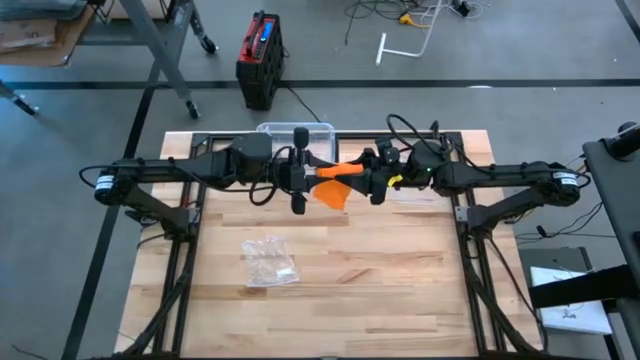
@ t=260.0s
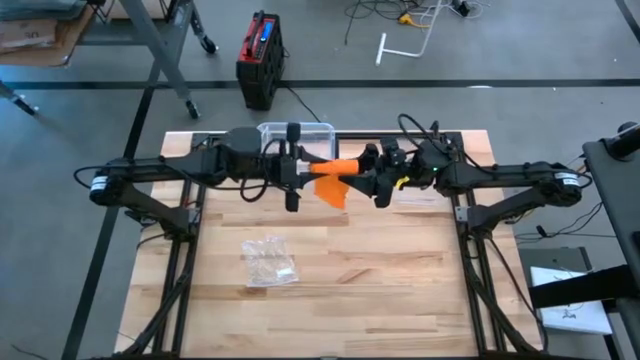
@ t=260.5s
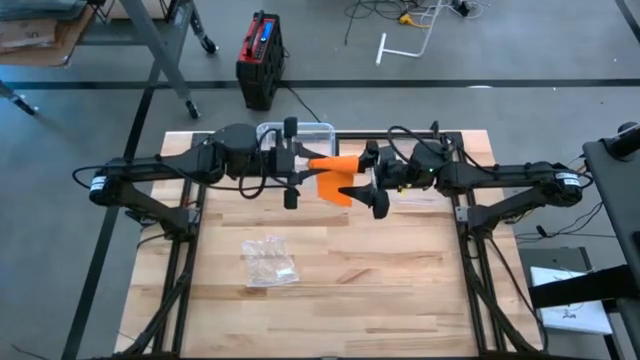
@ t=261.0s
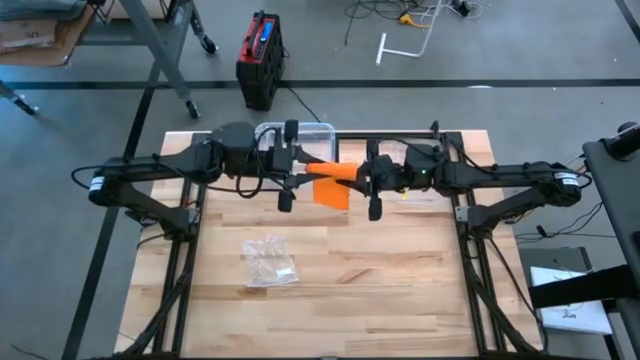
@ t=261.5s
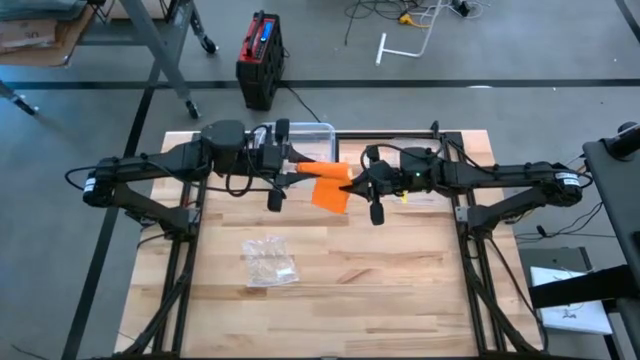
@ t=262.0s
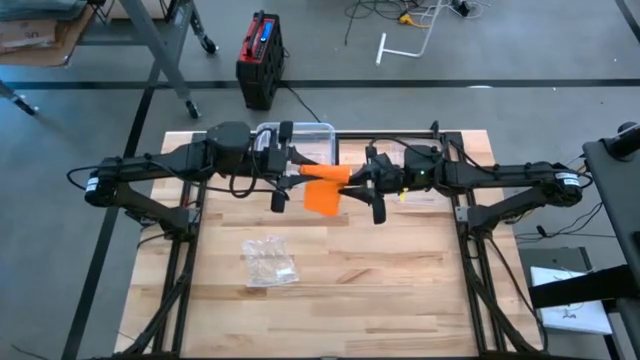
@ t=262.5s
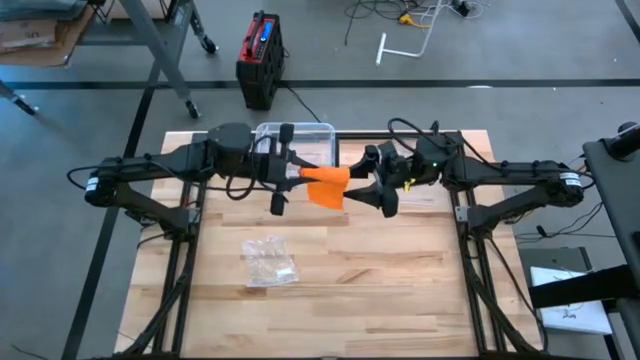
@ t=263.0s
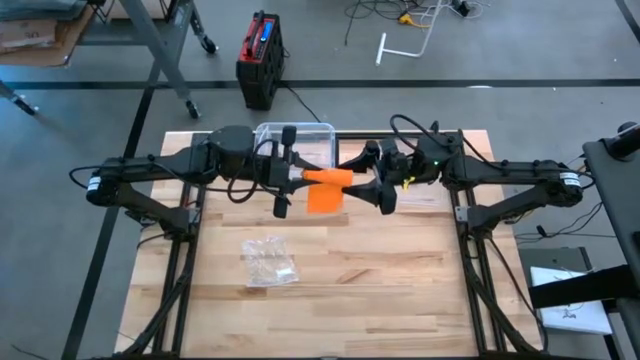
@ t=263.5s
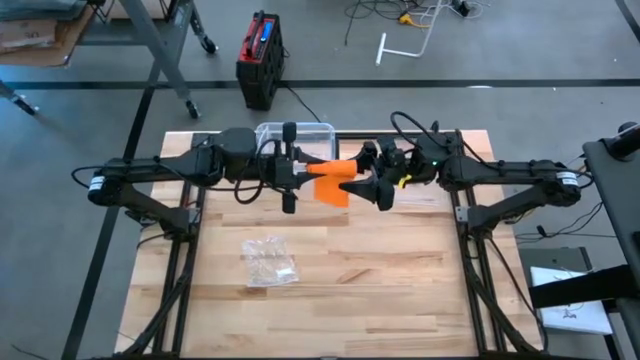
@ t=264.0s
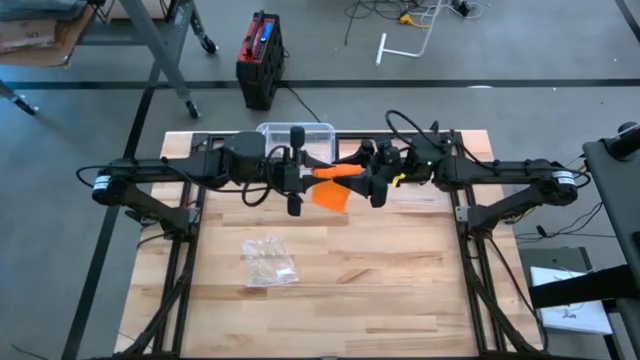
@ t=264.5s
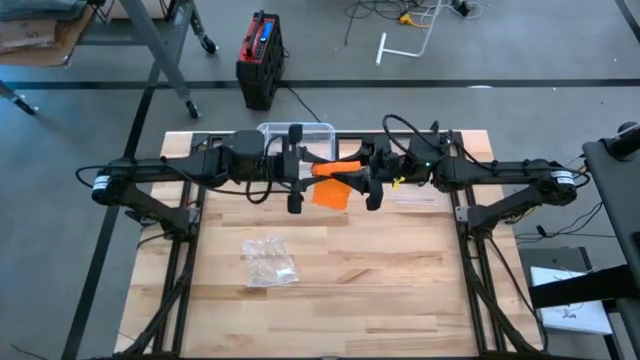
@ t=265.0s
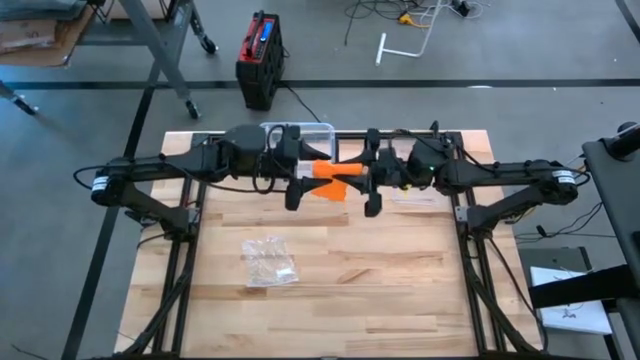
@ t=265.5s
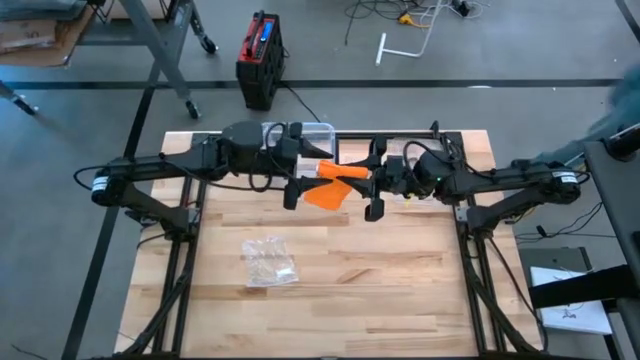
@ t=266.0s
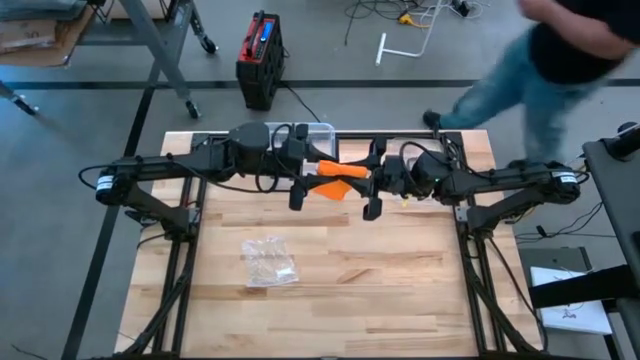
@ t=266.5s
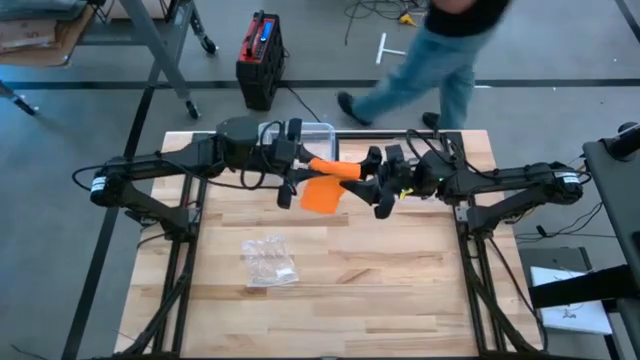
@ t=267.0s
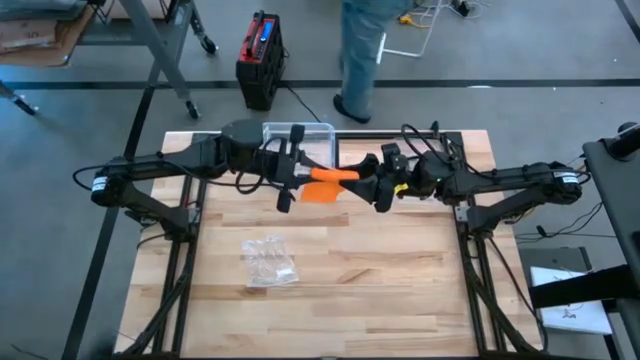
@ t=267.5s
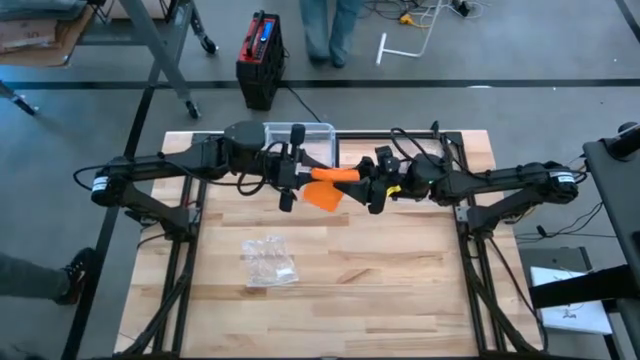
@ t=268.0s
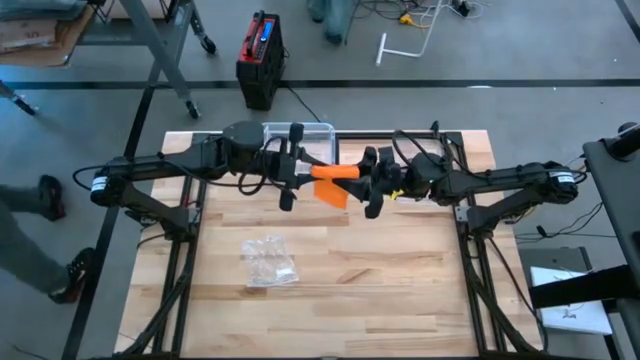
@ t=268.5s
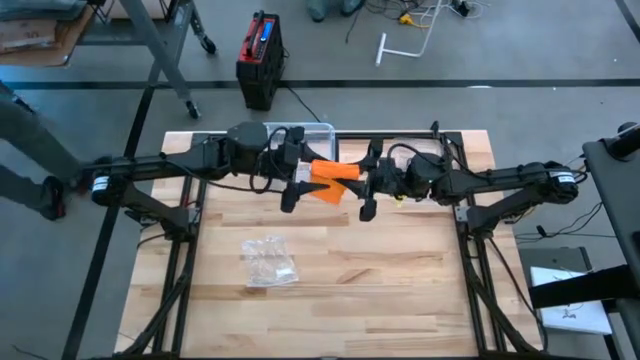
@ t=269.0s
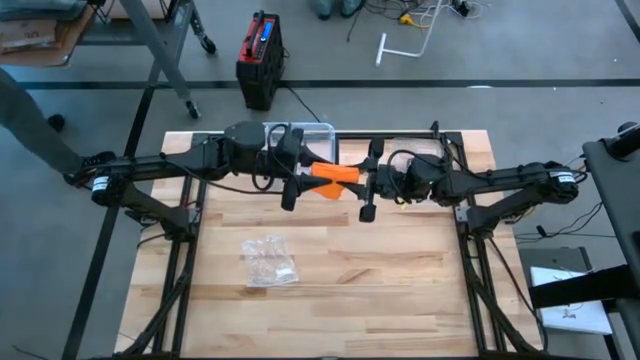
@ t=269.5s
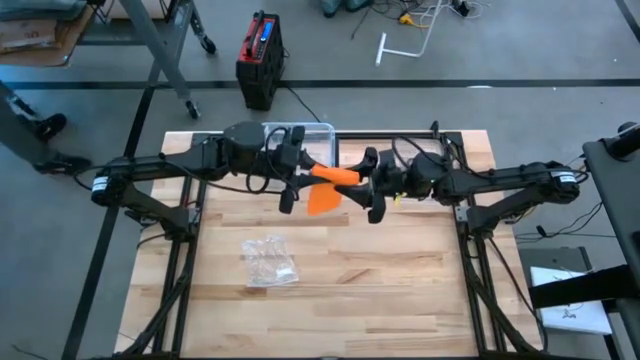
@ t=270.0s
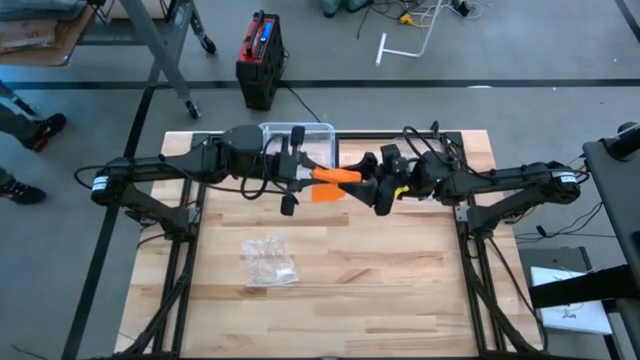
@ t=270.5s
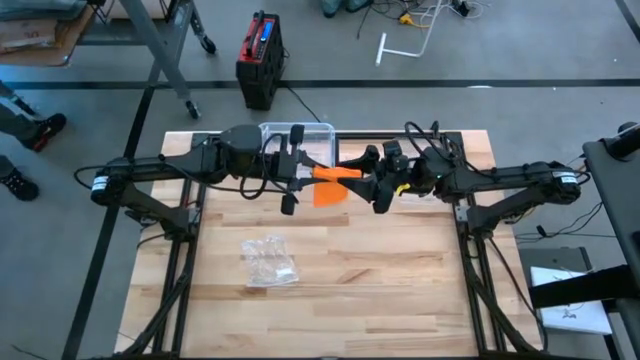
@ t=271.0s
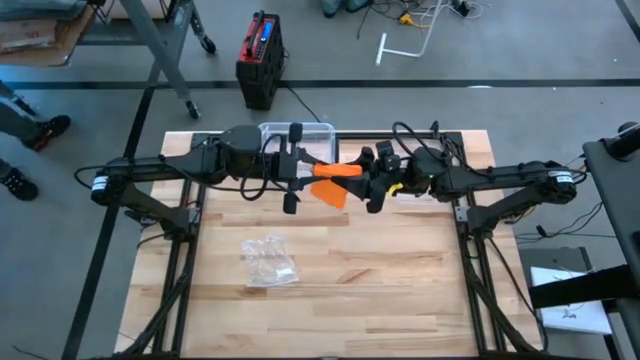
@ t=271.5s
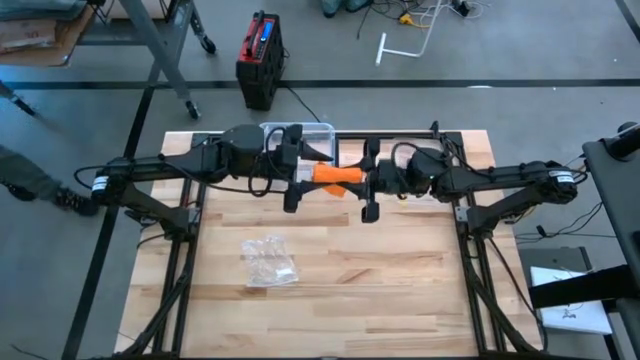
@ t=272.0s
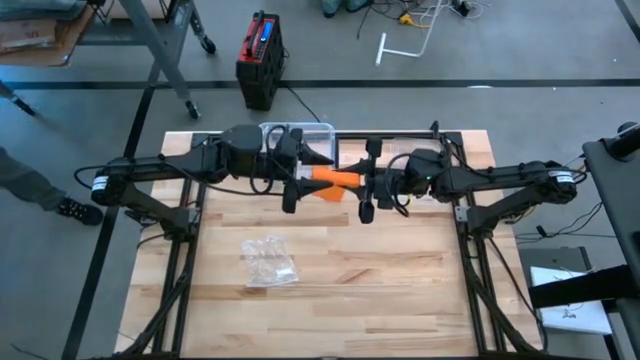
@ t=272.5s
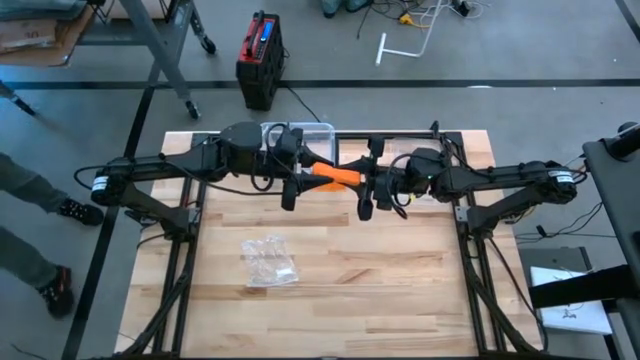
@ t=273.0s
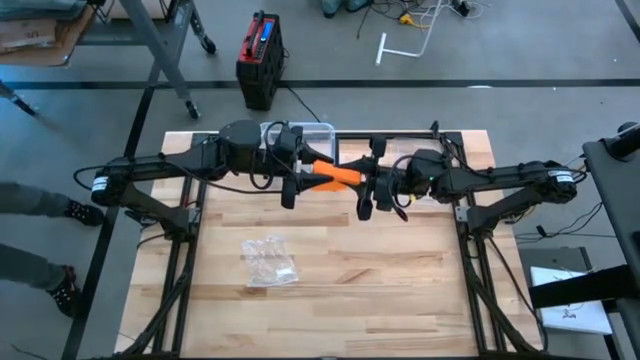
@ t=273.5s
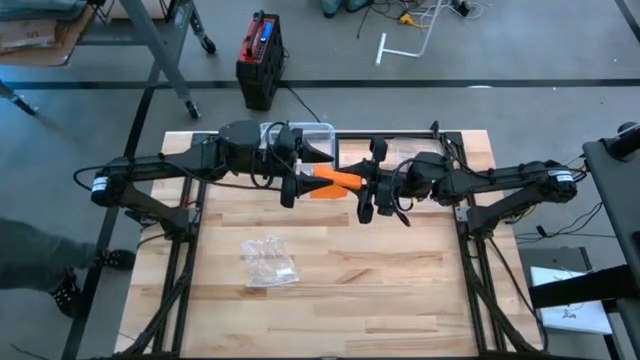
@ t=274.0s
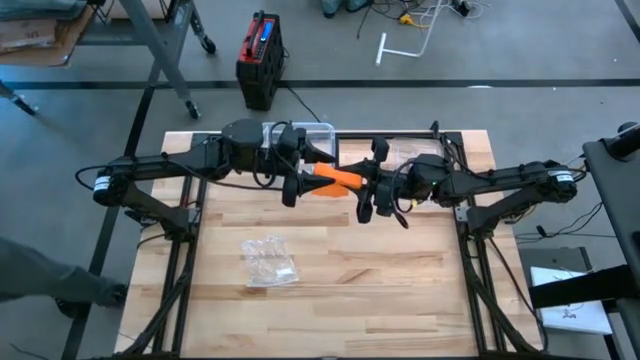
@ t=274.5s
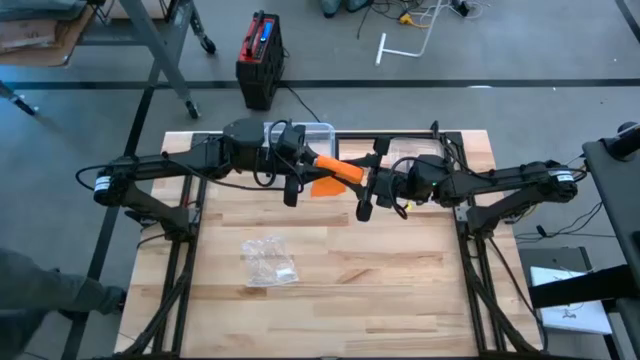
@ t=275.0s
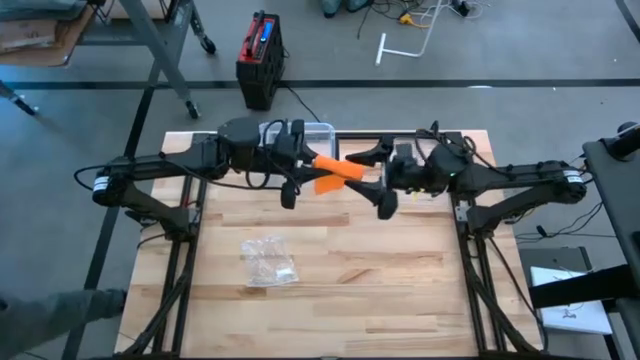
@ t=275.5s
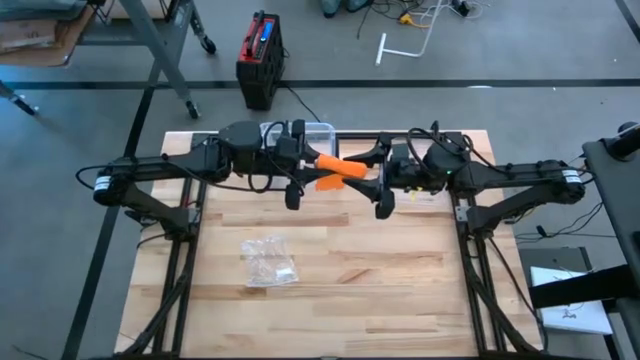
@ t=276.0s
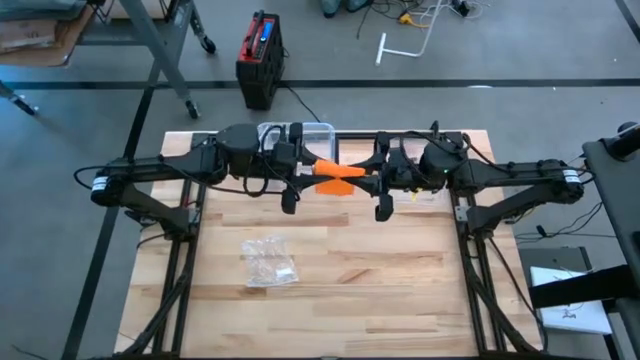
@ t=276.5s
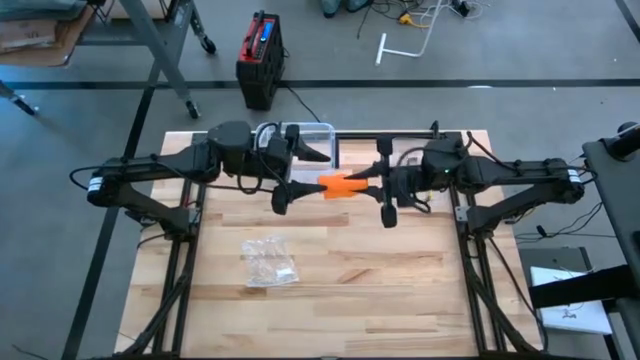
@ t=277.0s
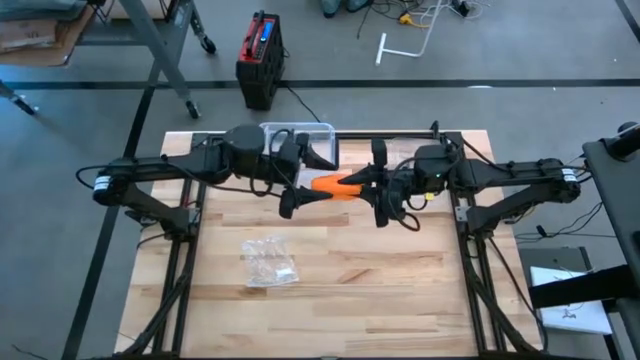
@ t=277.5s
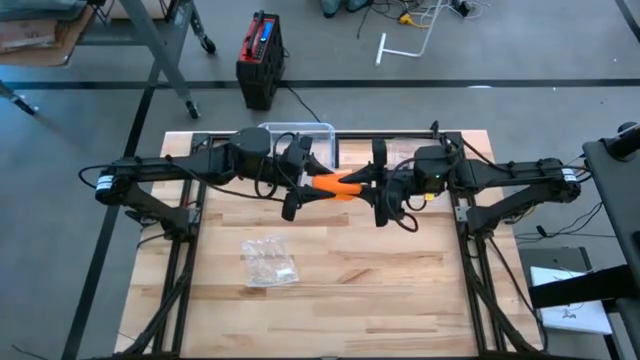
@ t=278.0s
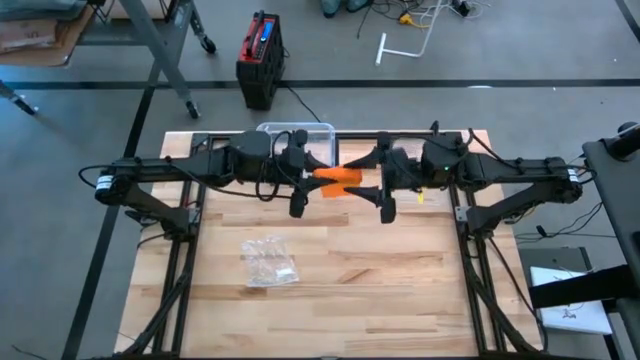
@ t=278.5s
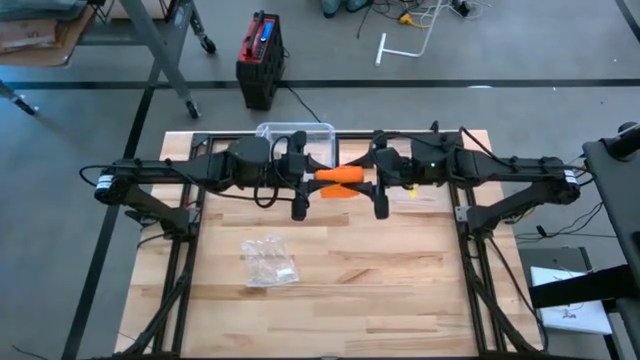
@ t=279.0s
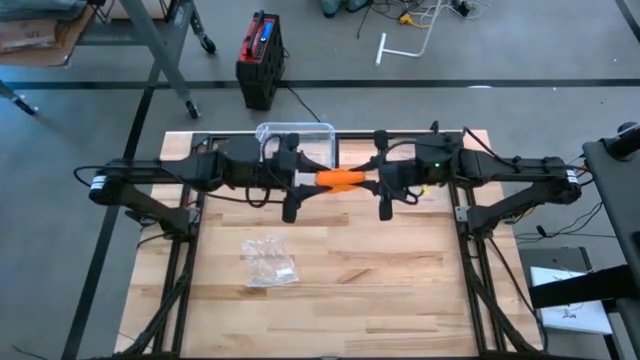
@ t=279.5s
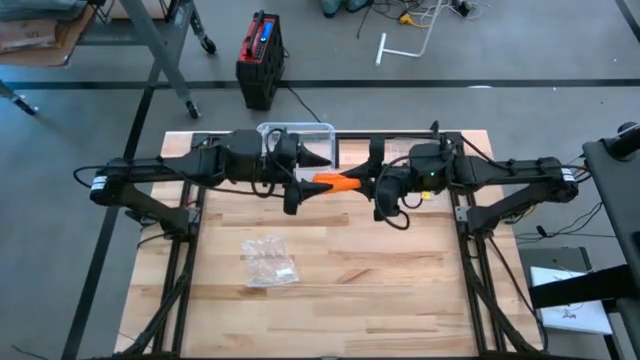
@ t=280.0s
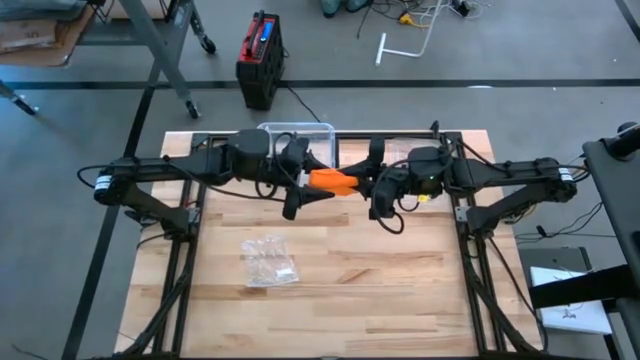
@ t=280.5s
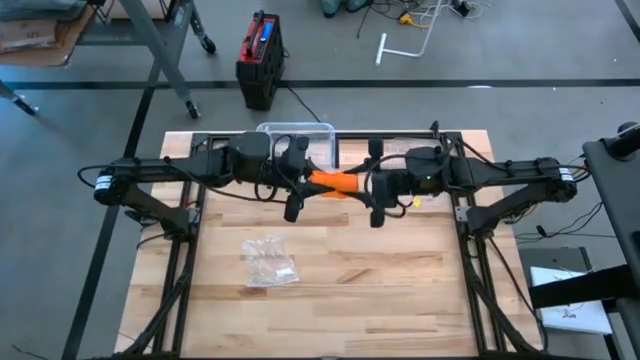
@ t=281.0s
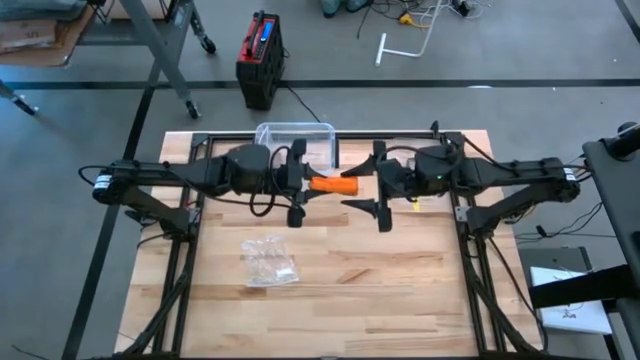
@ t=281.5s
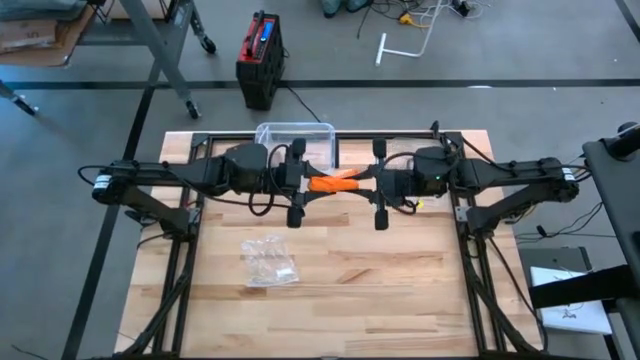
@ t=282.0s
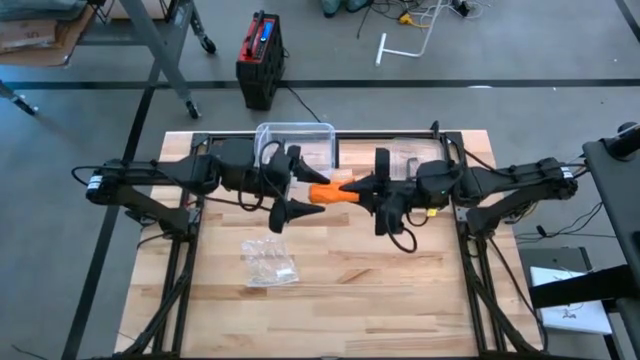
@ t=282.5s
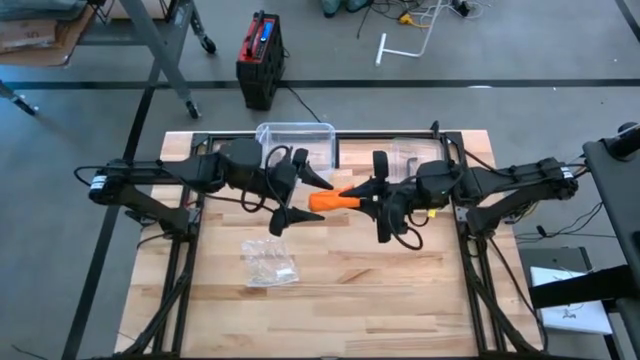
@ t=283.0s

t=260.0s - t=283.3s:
Task: Roll bandage
Roll the orange bandage
